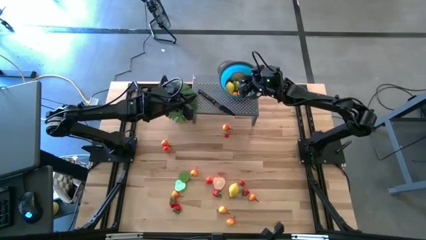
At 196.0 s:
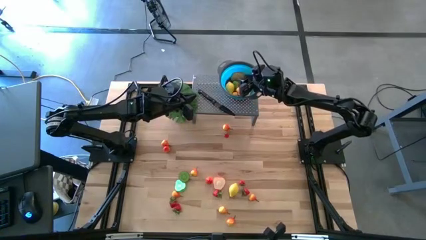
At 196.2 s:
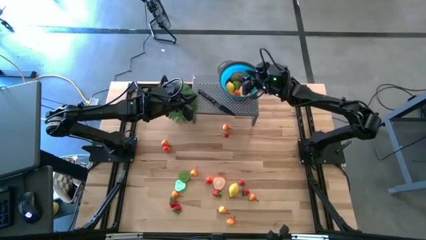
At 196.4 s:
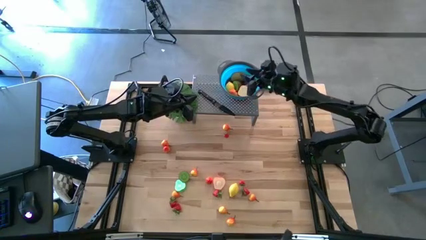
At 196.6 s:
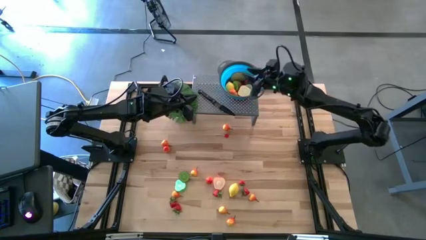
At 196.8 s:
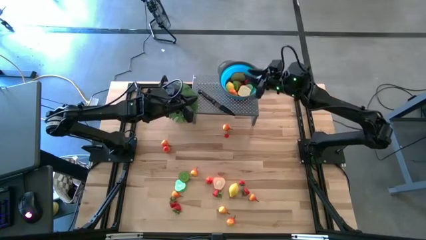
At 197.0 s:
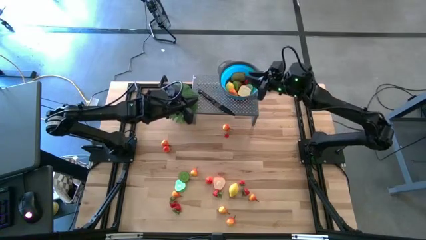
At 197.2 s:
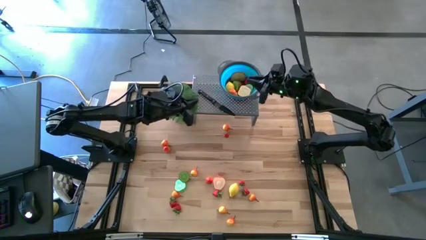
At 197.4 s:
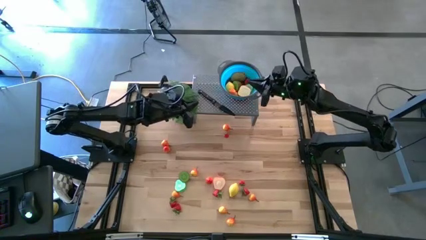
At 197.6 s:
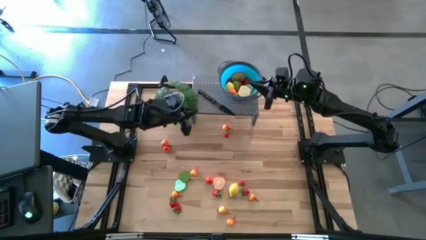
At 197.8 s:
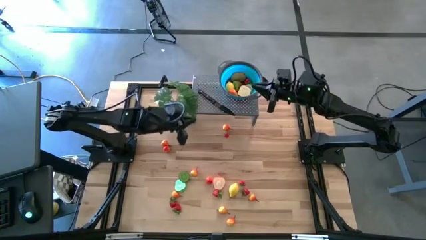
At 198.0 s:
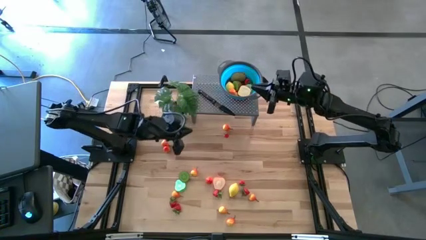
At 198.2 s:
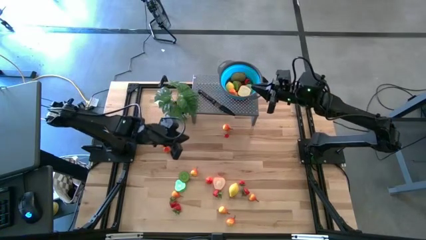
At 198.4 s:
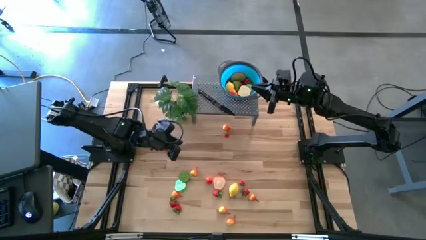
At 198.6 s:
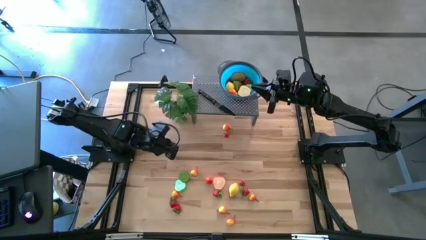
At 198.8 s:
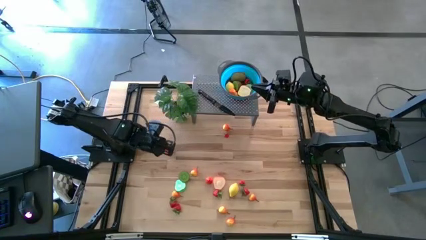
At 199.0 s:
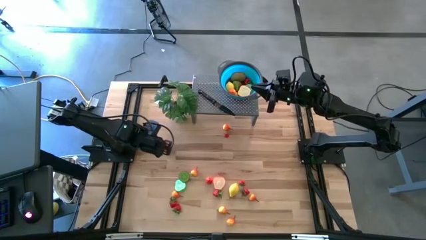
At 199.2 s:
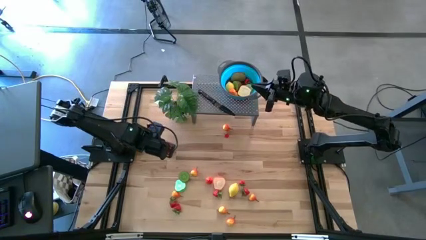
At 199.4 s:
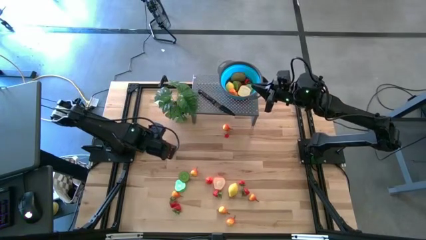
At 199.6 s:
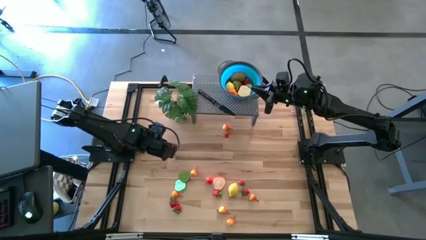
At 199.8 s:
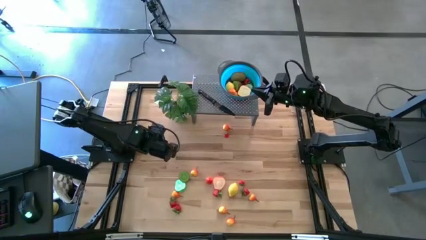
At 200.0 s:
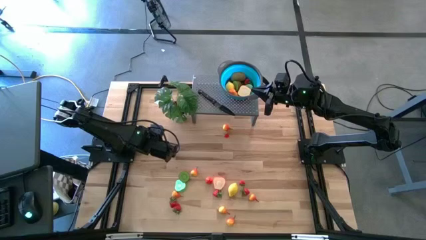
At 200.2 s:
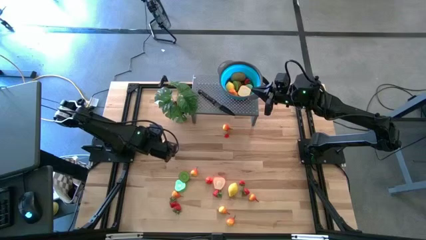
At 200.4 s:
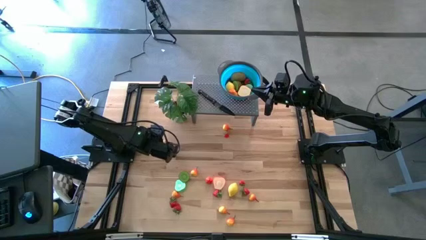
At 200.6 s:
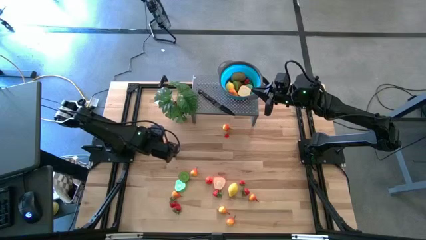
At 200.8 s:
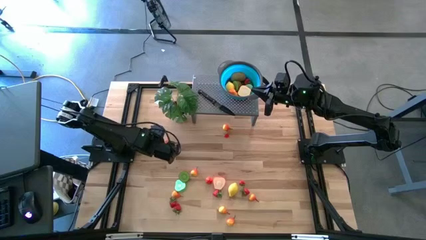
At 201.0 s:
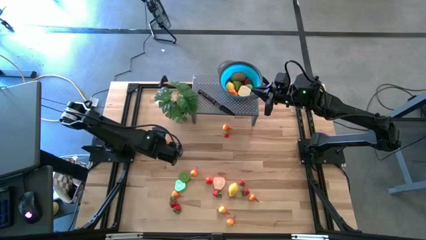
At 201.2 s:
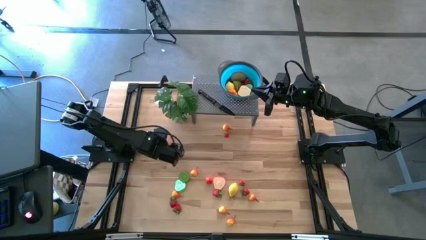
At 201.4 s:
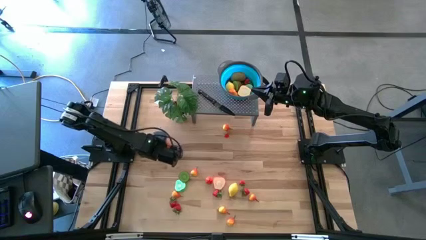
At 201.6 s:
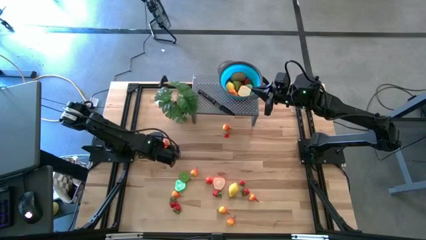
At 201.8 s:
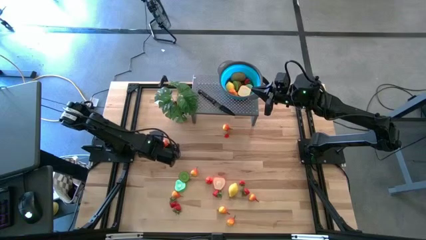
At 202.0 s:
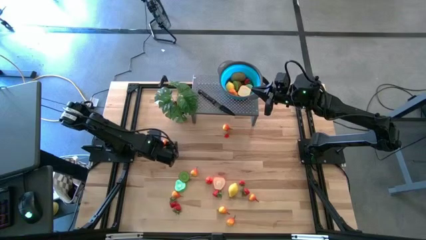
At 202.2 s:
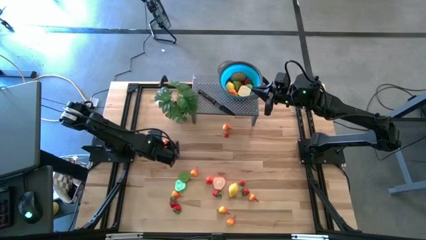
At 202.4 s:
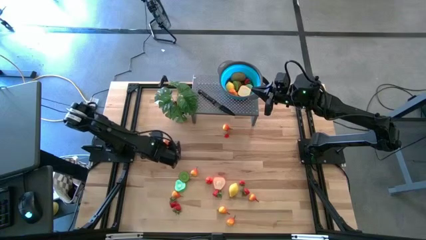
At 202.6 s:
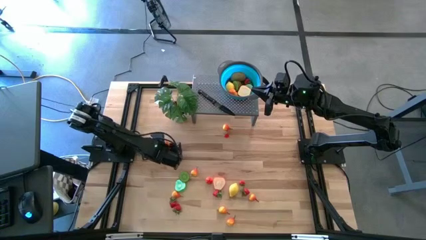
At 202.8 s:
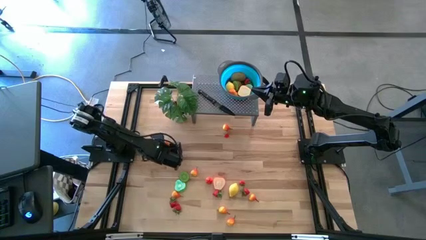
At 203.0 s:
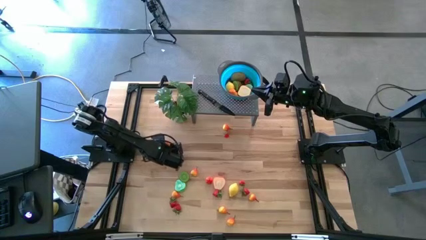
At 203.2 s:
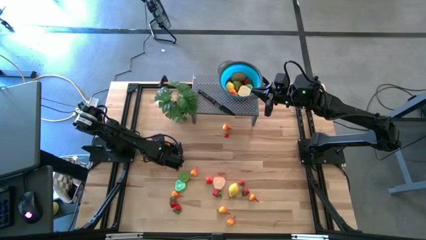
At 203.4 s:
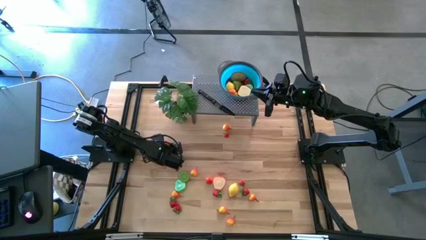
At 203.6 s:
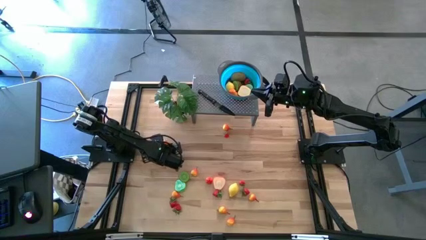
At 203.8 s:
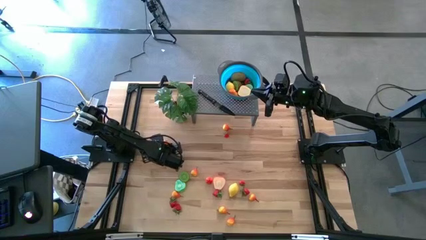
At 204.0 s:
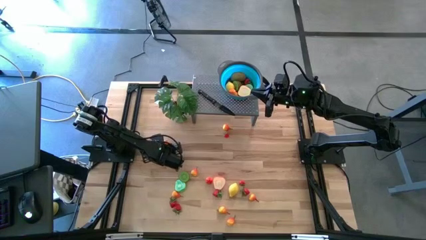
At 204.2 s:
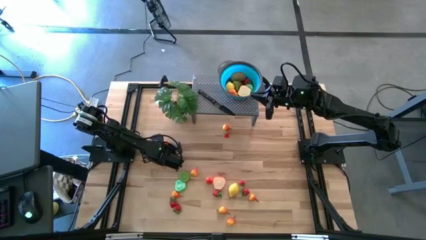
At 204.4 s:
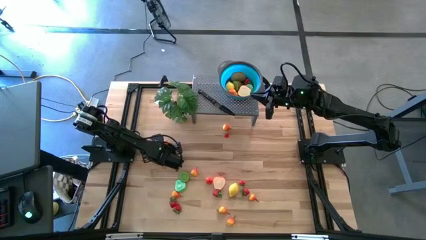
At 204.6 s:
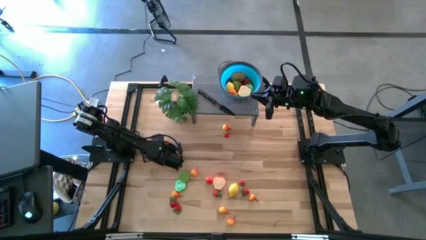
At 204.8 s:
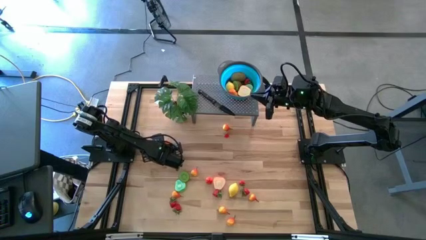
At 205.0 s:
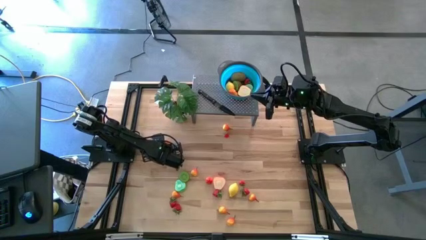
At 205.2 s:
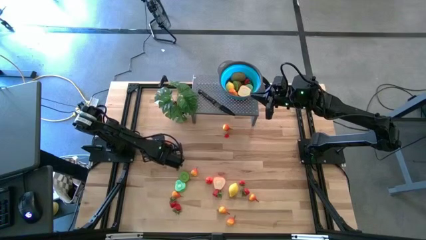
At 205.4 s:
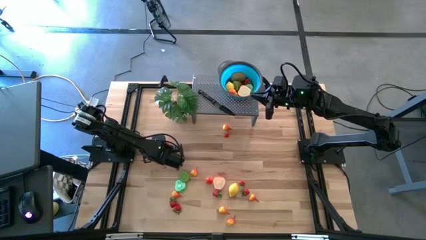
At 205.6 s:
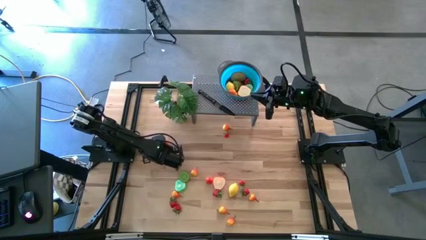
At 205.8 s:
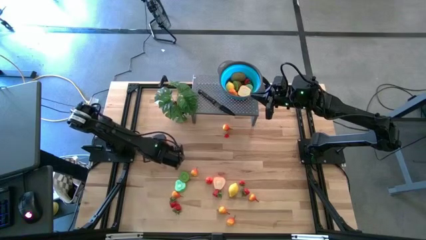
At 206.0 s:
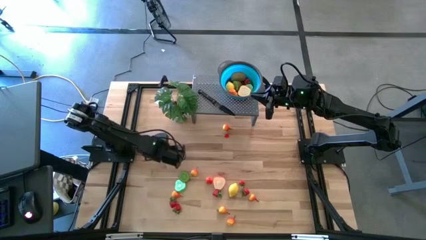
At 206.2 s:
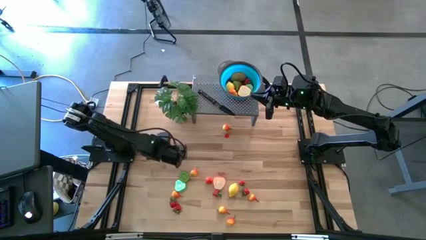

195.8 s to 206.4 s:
Task: Pick & Place Fruit
Put the yellow pear in the blue bowl on the shelf

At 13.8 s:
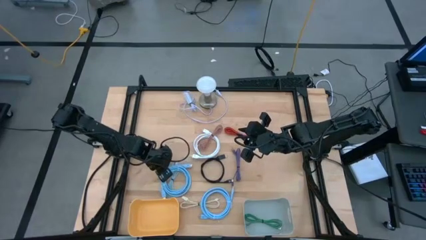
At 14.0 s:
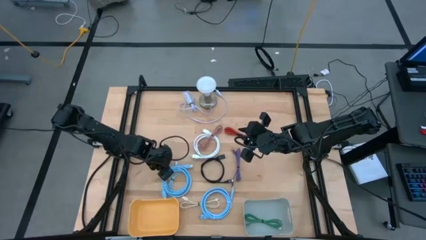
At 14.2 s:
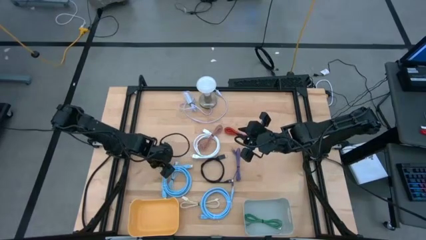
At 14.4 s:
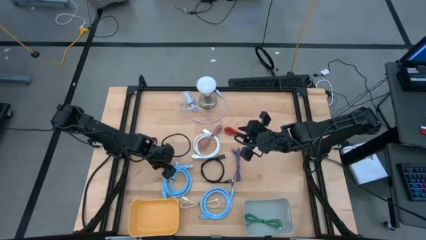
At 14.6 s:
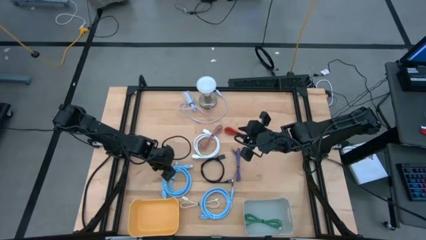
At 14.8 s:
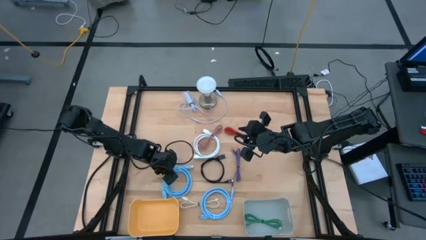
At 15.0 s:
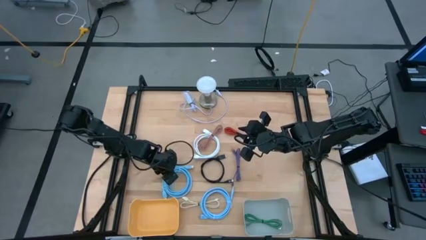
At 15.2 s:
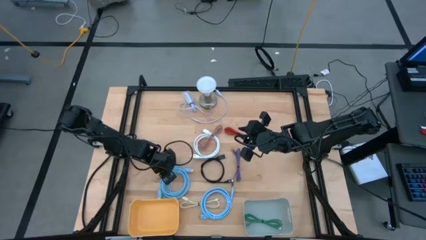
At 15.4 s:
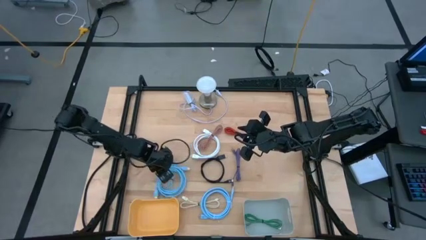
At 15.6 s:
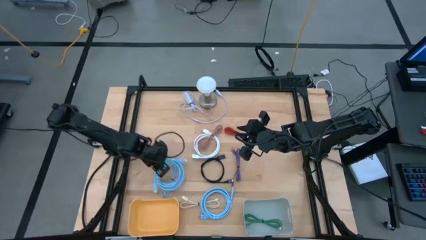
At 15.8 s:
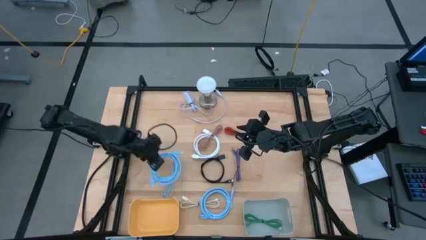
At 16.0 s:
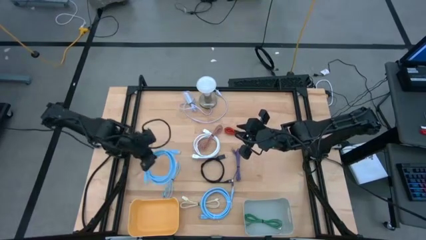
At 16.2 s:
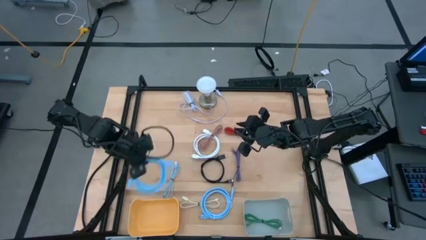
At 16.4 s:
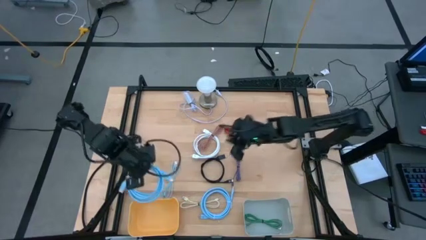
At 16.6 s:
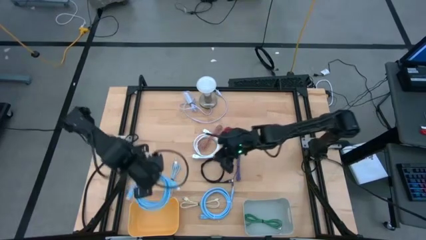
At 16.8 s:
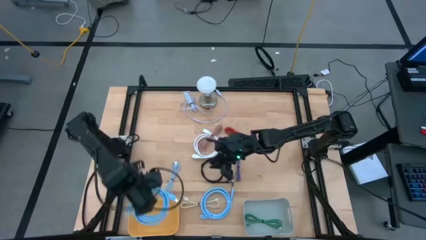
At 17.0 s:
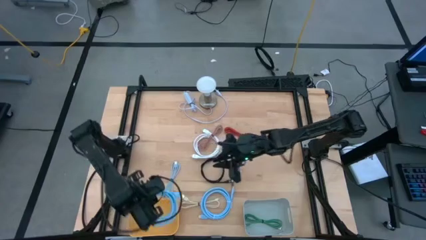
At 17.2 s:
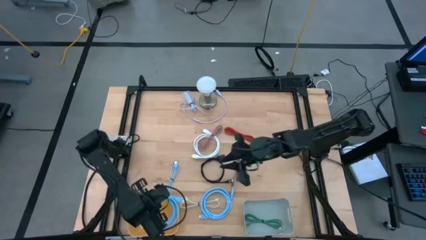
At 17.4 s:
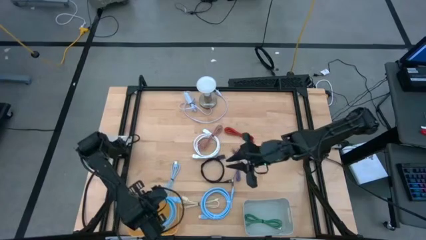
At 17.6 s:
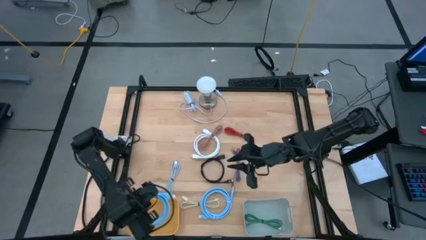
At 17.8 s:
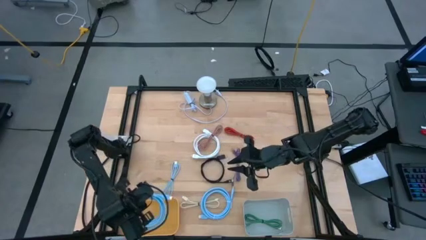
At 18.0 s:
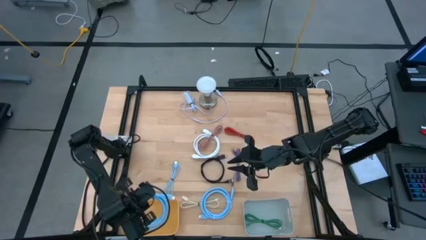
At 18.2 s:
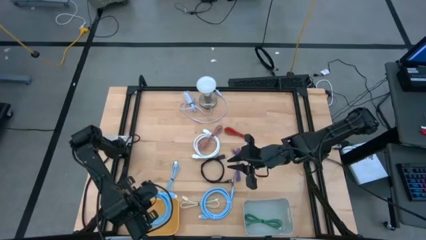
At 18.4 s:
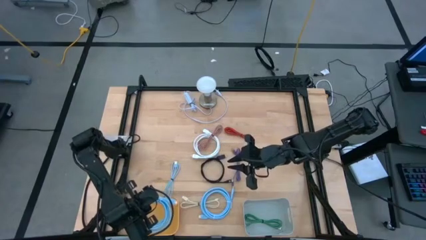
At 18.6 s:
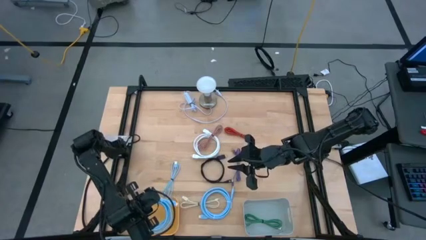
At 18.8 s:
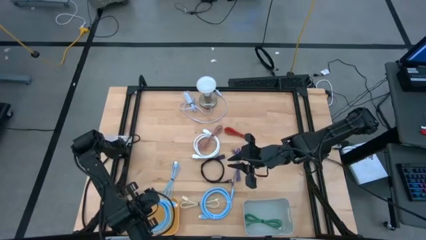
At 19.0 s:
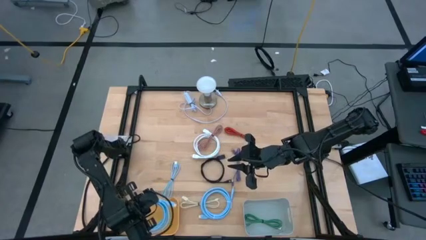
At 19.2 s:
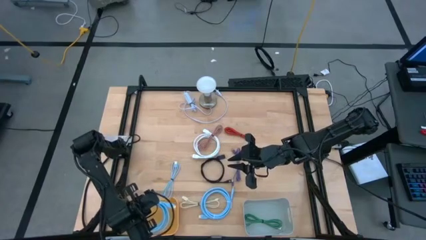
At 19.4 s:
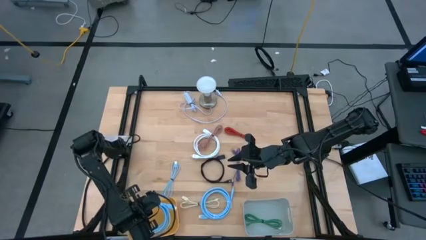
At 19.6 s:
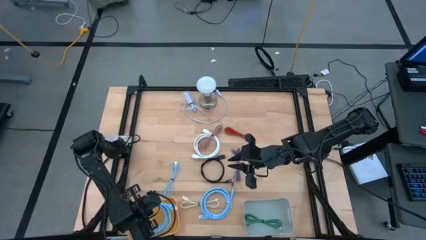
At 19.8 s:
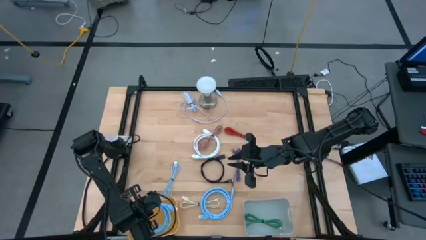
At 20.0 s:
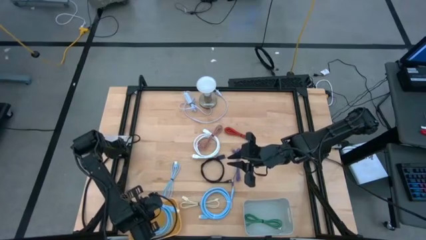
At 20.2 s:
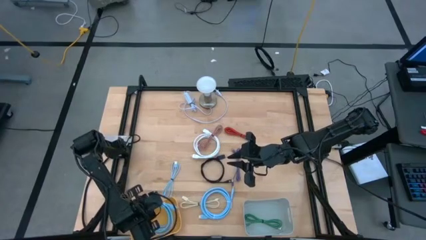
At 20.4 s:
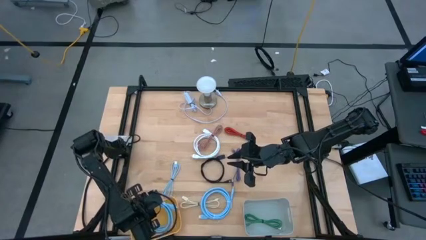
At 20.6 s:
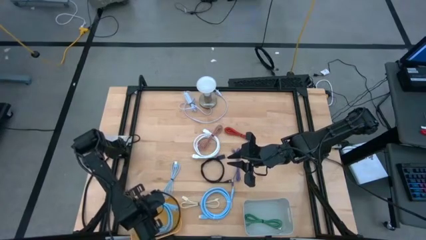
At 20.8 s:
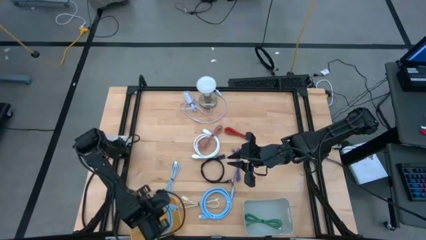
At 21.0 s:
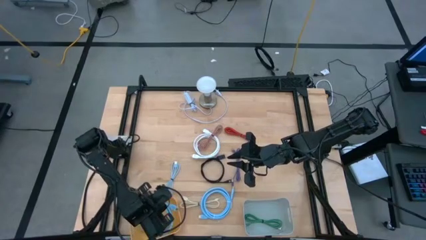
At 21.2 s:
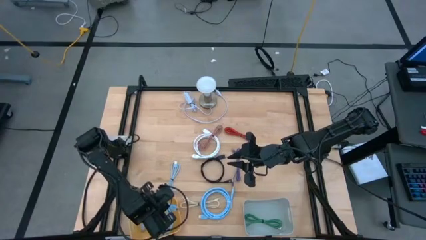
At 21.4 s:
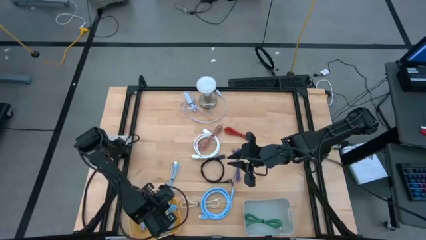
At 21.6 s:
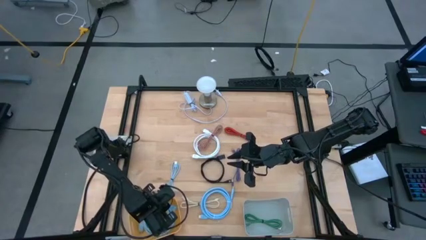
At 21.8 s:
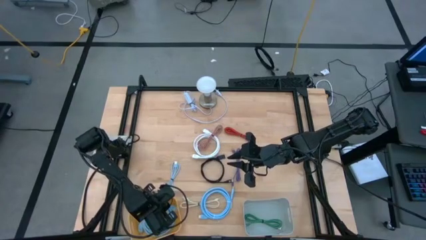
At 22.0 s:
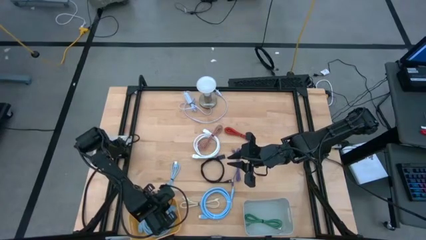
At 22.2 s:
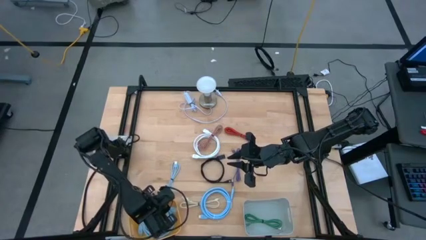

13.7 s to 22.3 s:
Task: Pick & Place USB Port
Put the left blue HDMI cable into the orange bin
